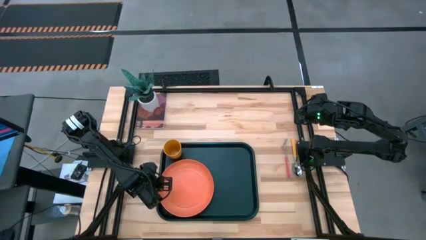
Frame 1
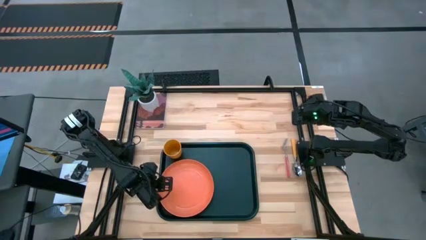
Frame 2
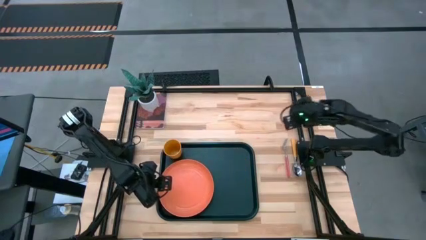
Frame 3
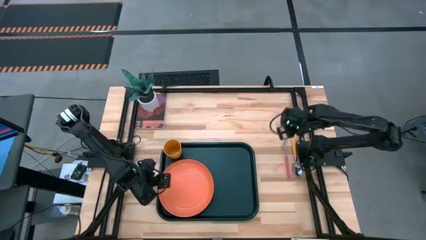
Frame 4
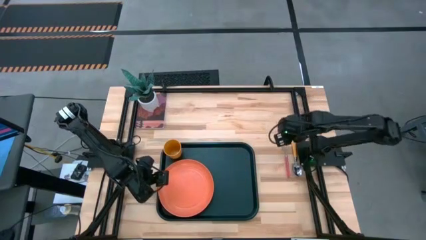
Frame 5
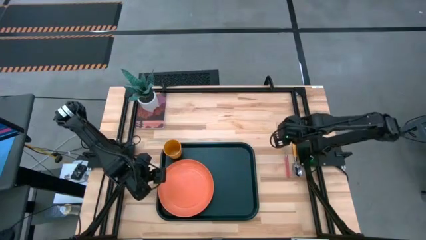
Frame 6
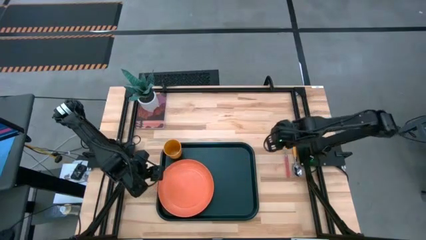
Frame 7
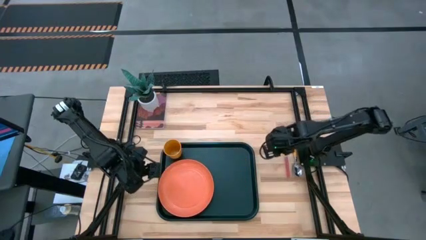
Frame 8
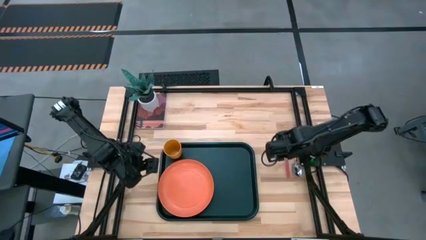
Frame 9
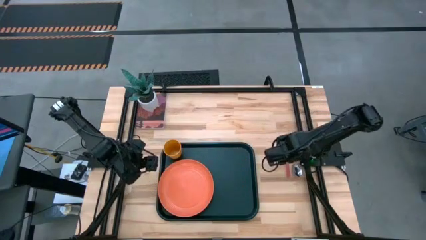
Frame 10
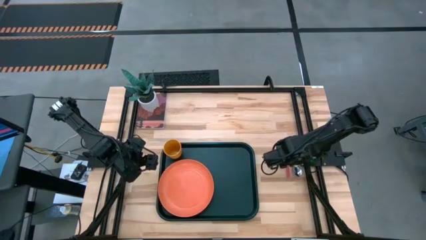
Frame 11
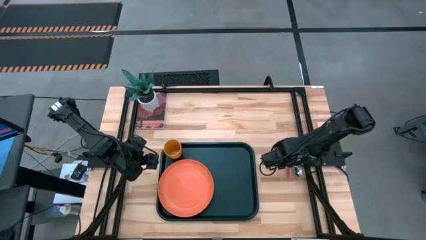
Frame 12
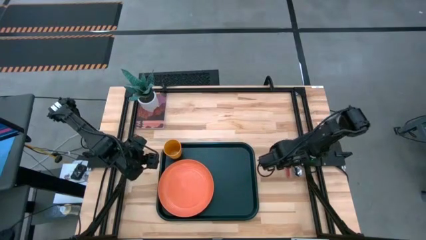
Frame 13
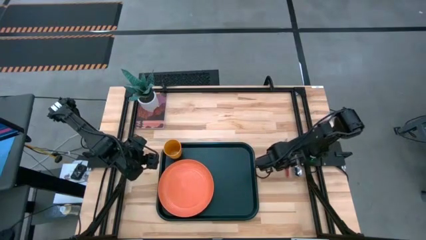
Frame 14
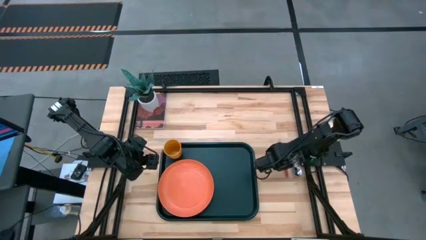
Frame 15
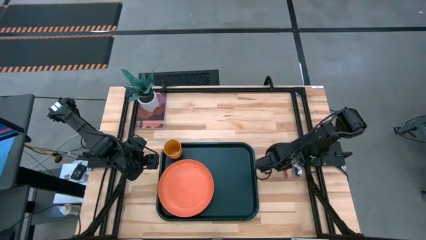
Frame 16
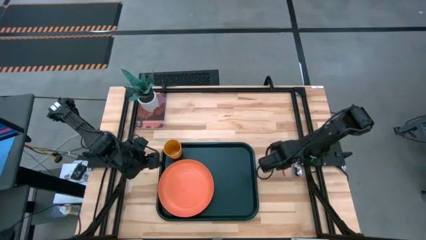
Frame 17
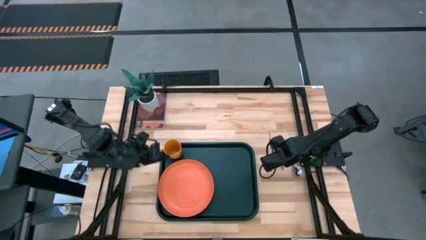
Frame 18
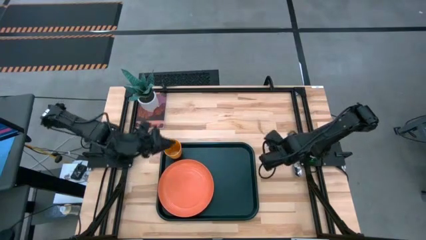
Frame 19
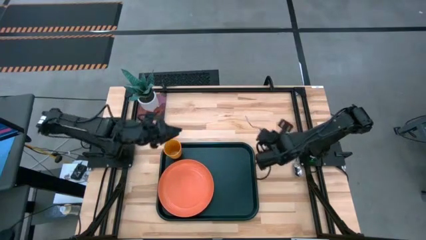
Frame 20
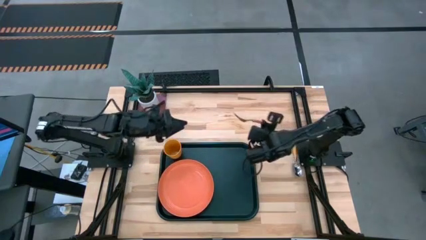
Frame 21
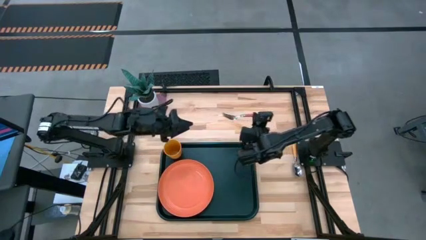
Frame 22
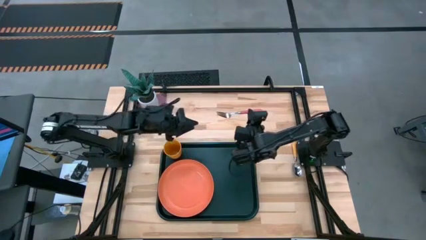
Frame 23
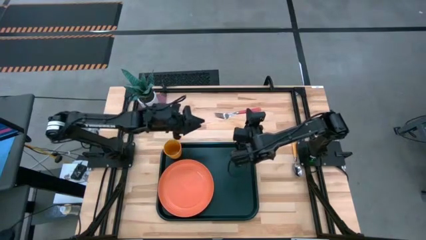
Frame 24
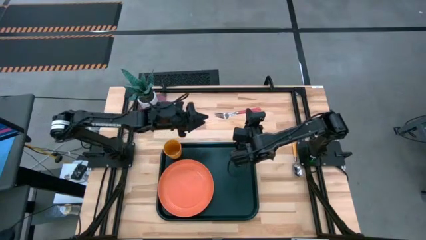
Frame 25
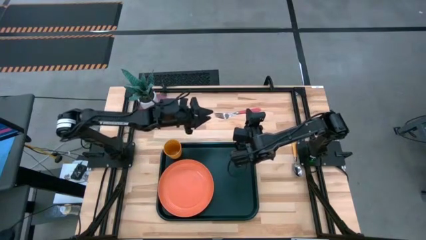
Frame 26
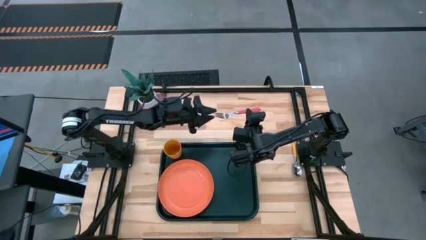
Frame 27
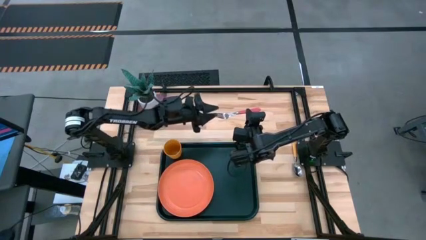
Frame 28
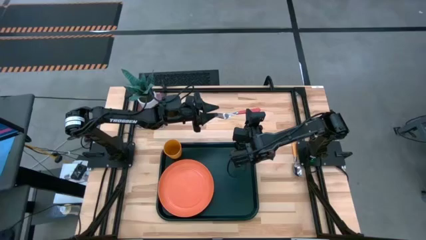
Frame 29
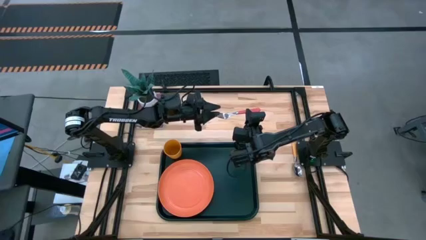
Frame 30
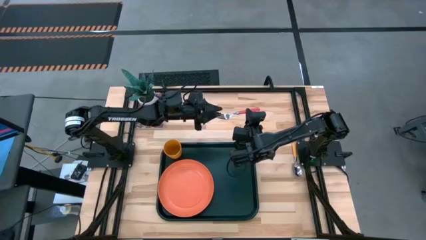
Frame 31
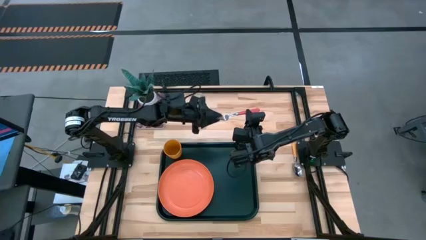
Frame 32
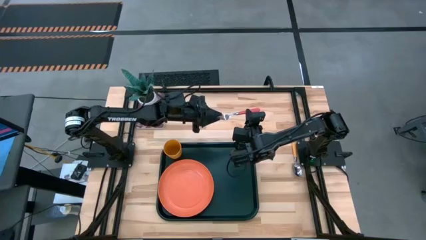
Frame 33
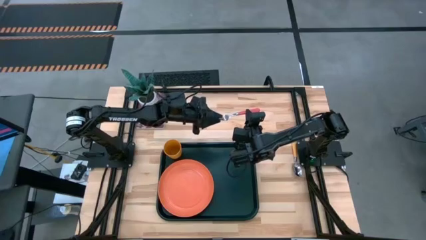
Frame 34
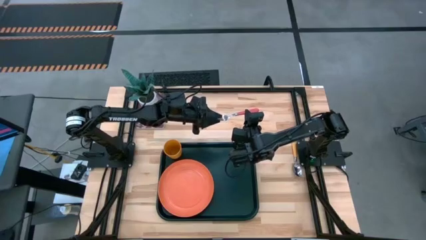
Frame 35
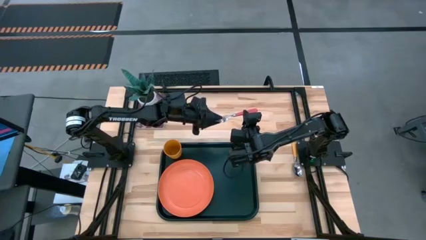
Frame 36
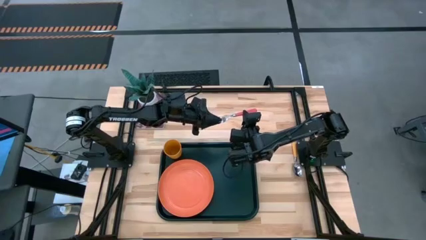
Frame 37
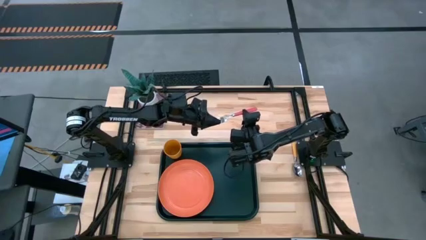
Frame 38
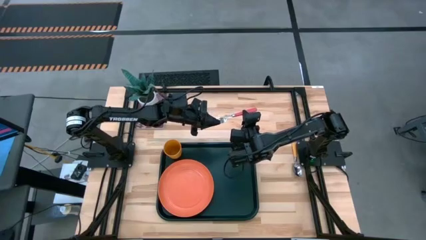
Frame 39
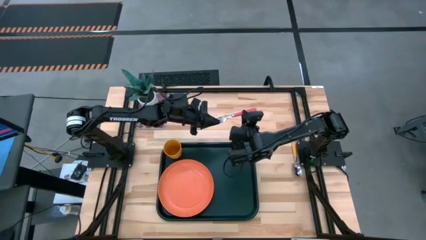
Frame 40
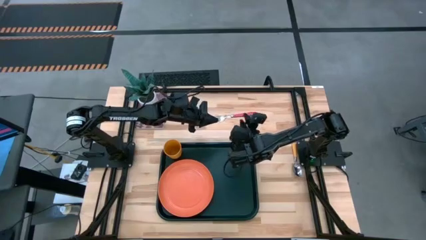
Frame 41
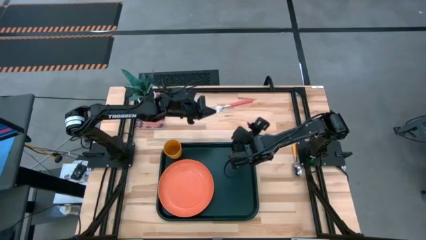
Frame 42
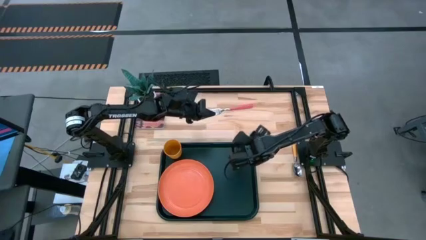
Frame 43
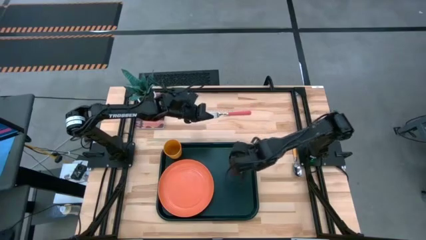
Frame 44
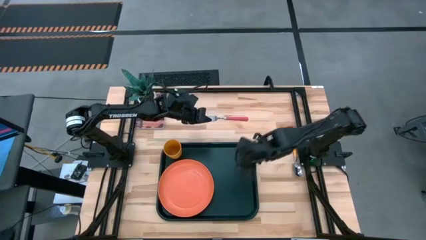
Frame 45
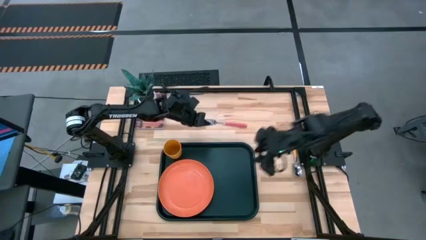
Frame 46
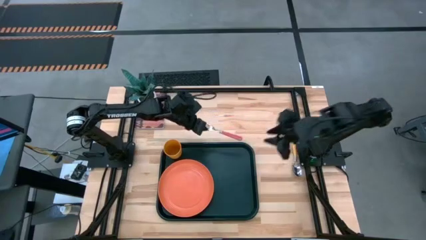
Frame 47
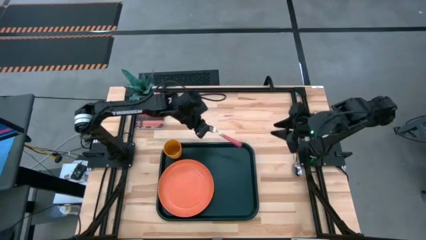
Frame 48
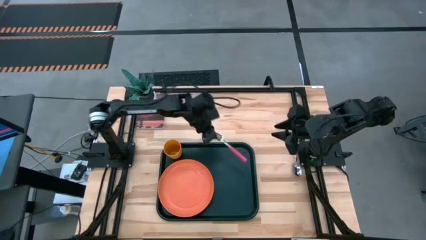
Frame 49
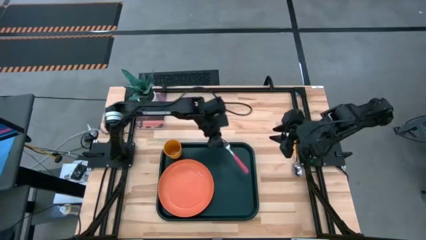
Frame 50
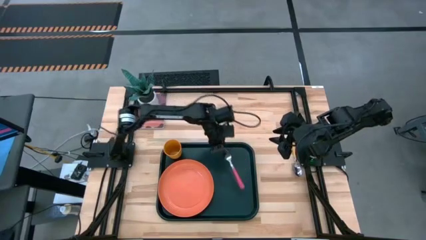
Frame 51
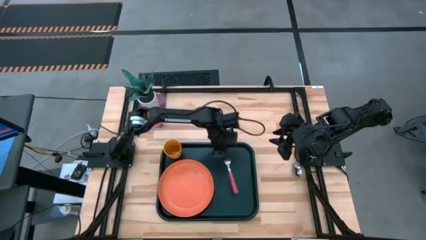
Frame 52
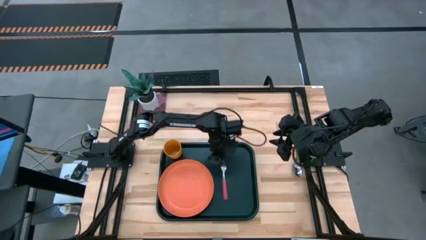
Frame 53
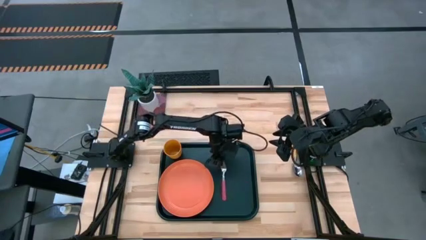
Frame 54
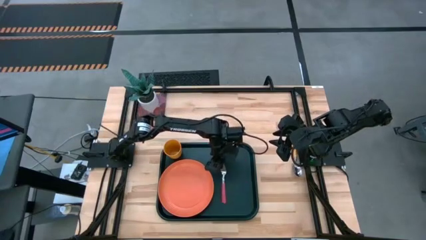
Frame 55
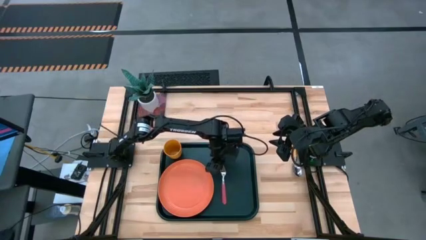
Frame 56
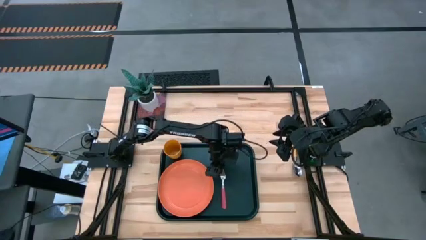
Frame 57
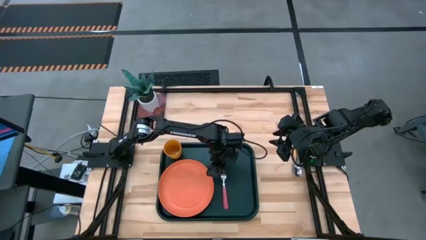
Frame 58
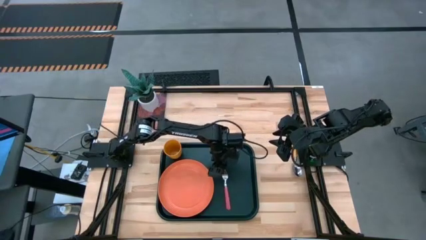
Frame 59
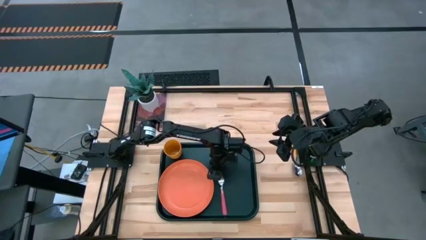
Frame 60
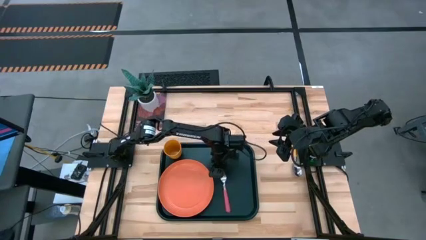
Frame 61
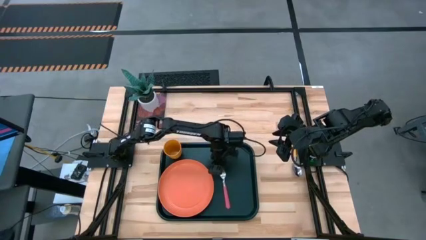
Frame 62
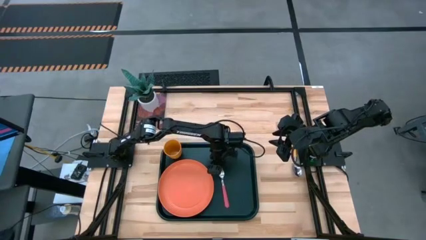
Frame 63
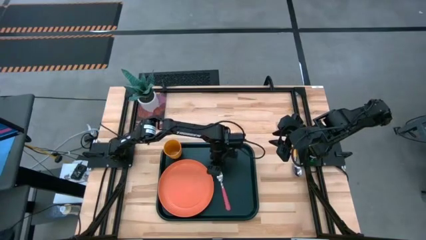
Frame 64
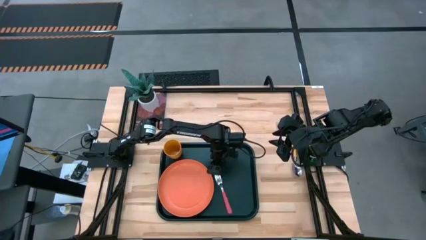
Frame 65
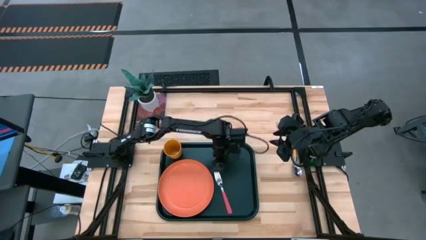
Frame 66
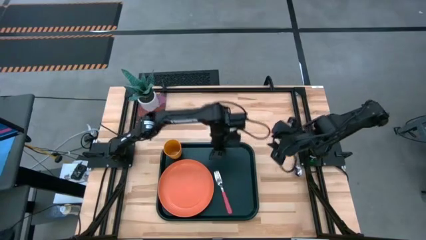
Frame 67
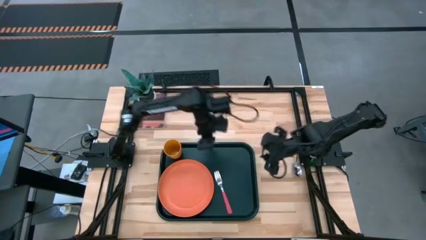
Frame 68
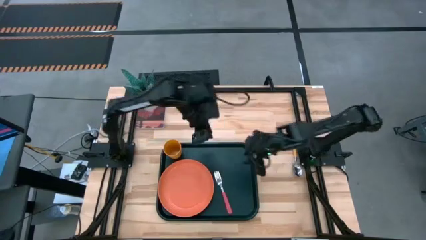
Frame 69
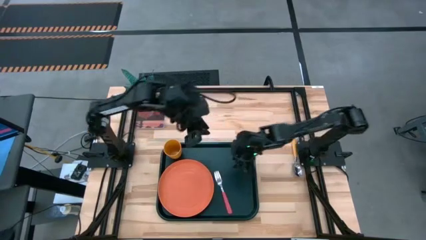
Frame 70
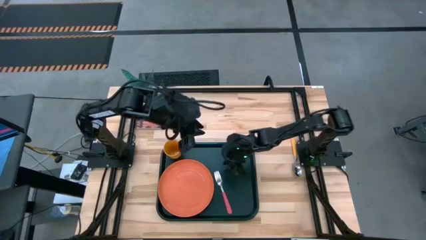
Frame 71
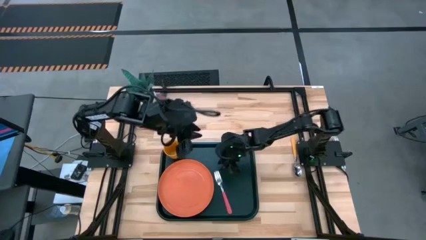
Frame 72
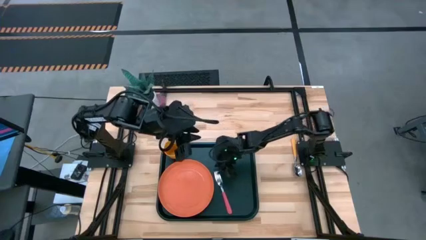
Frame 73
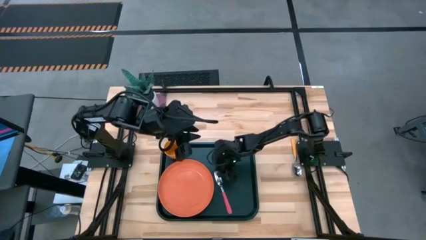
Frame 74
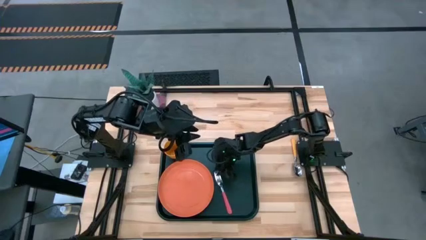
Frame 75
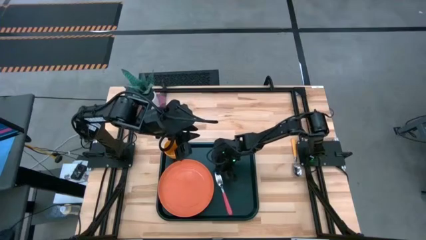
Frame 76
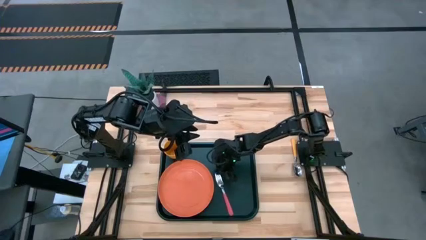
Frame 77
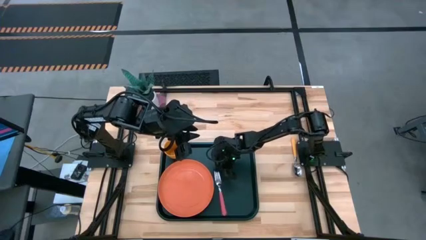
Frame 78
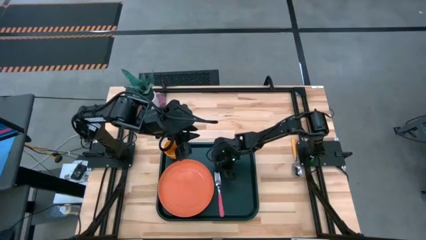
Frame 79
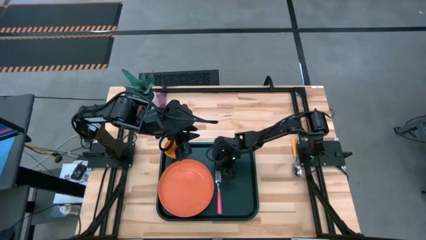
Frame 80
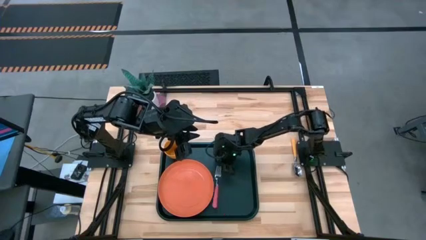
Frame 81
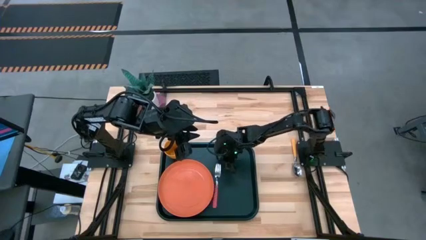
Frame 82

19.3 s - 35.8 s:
Task: Pick and place plate/cup/fork/spoon on tray
Put the pink fork on the black serving tray
